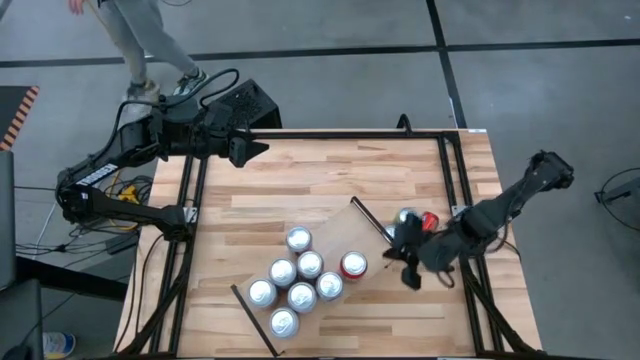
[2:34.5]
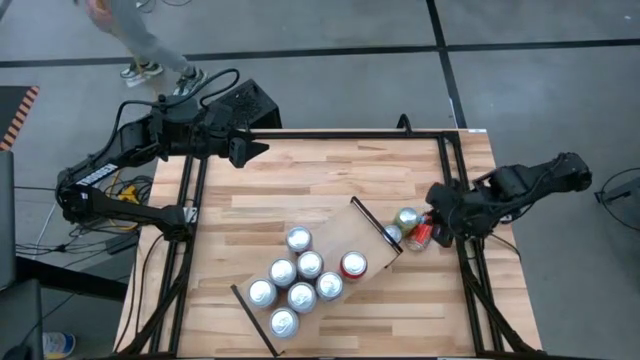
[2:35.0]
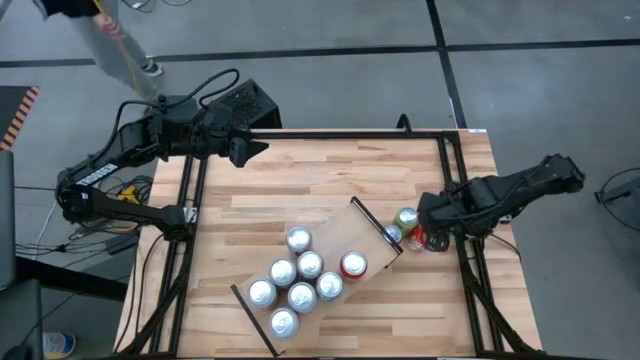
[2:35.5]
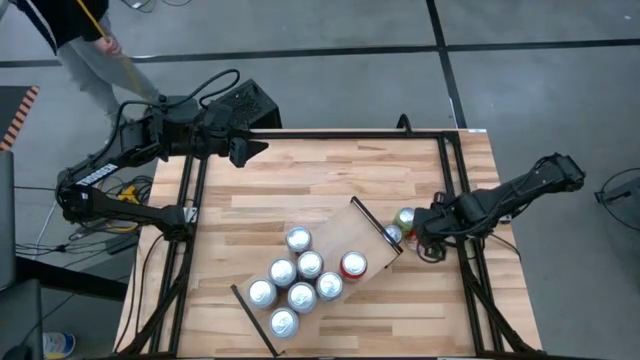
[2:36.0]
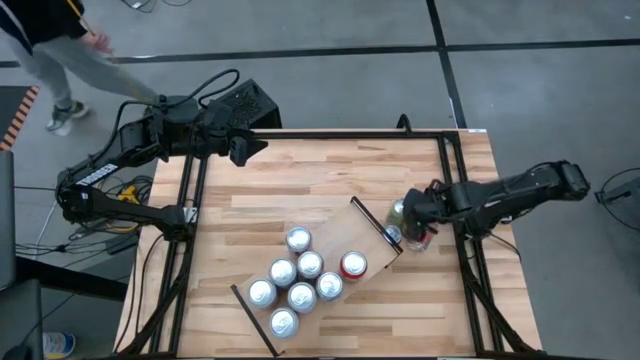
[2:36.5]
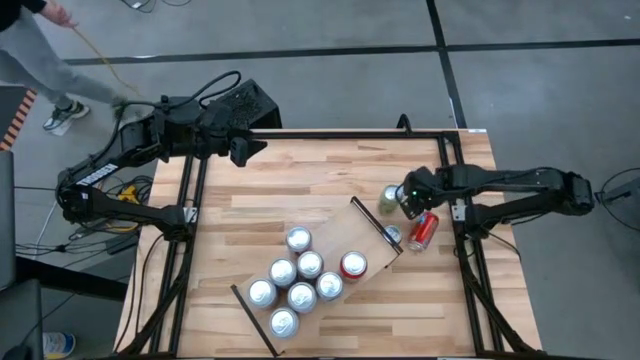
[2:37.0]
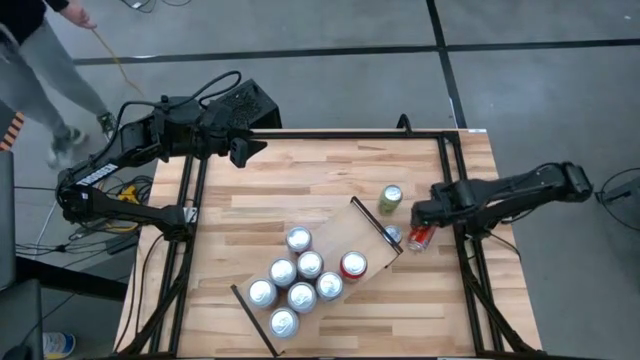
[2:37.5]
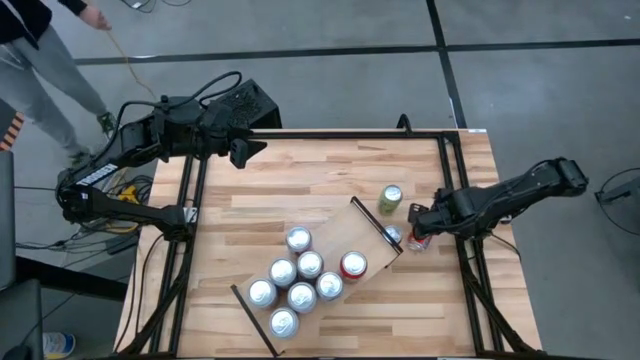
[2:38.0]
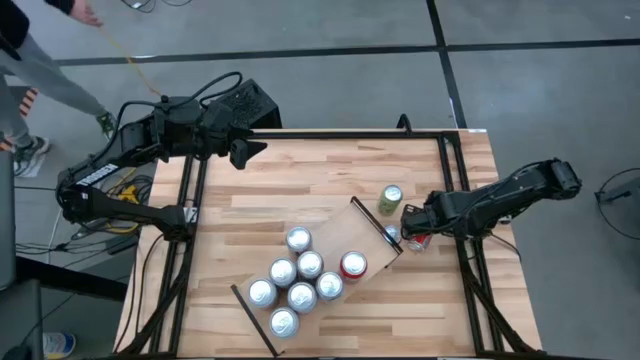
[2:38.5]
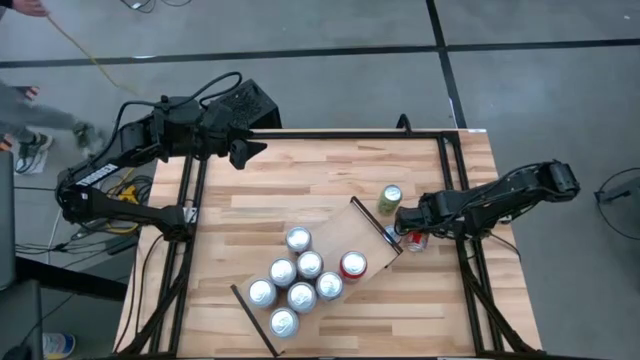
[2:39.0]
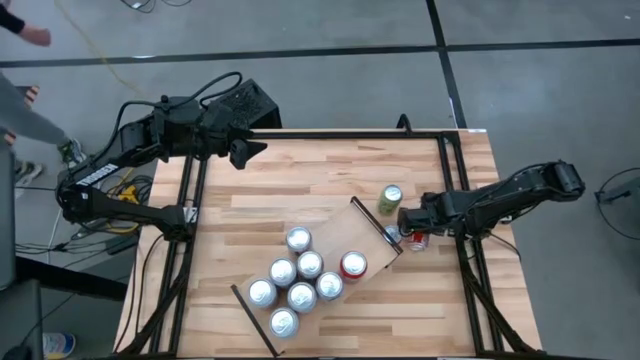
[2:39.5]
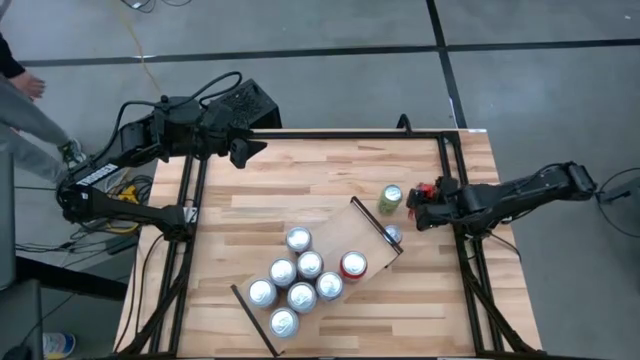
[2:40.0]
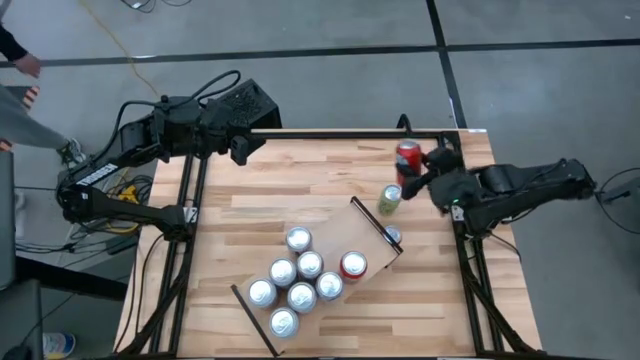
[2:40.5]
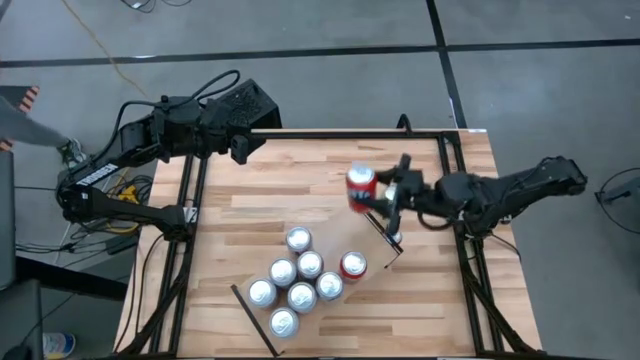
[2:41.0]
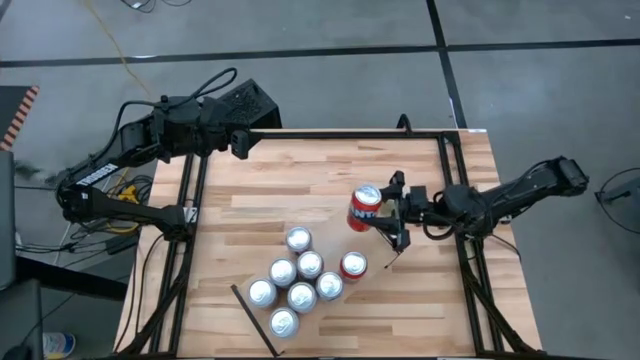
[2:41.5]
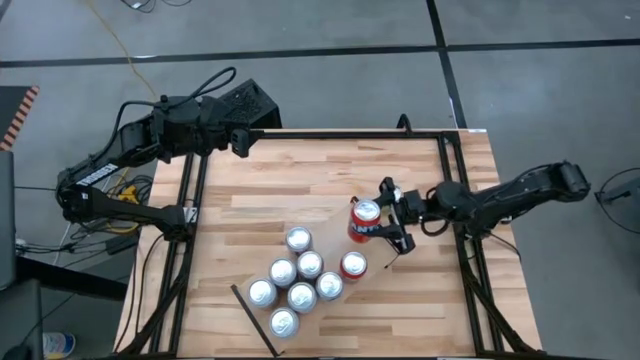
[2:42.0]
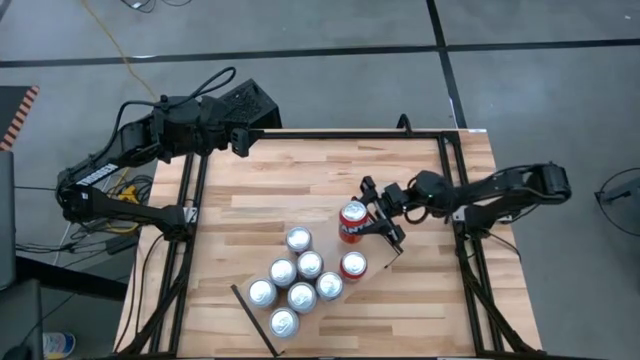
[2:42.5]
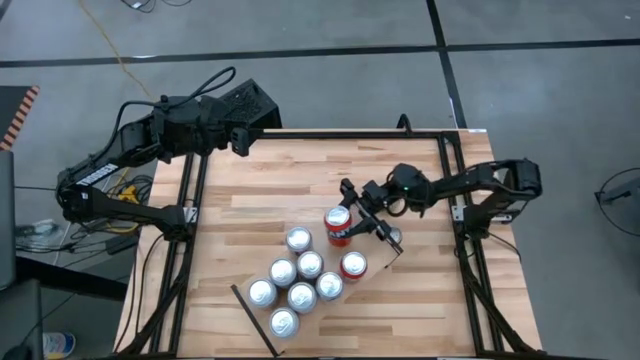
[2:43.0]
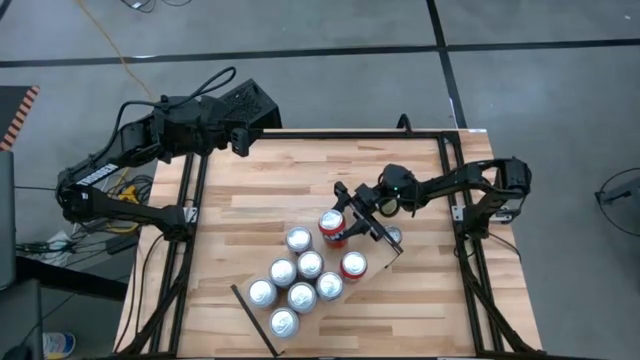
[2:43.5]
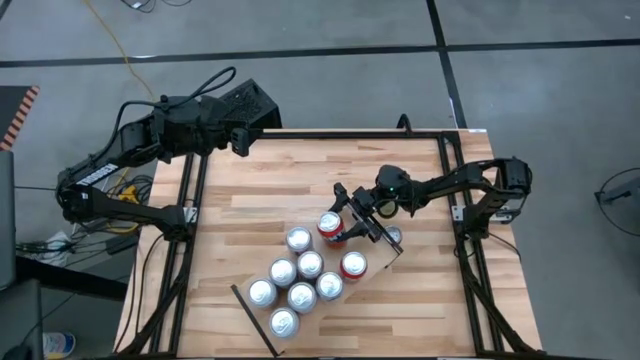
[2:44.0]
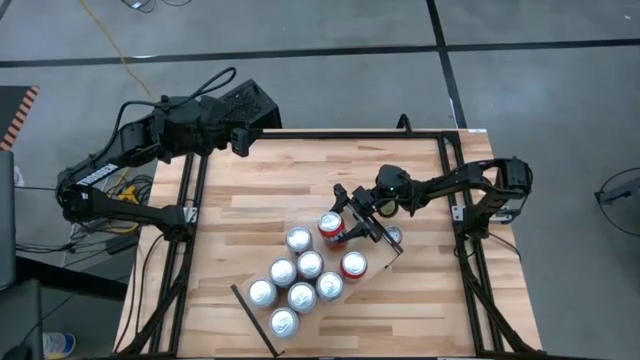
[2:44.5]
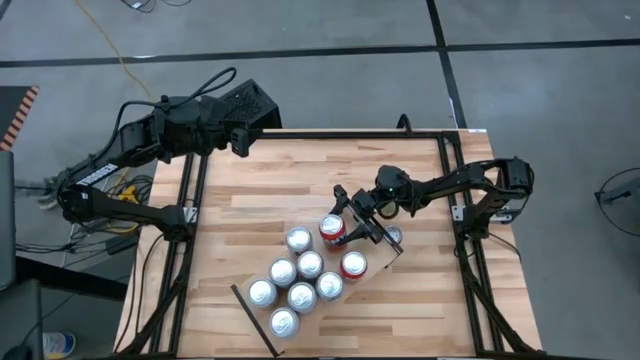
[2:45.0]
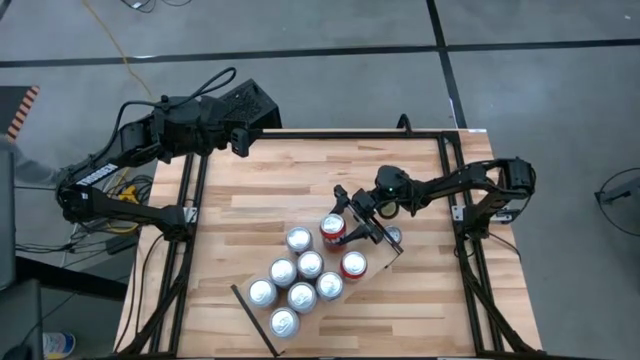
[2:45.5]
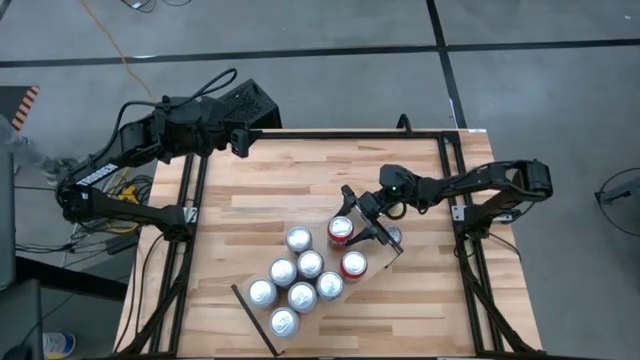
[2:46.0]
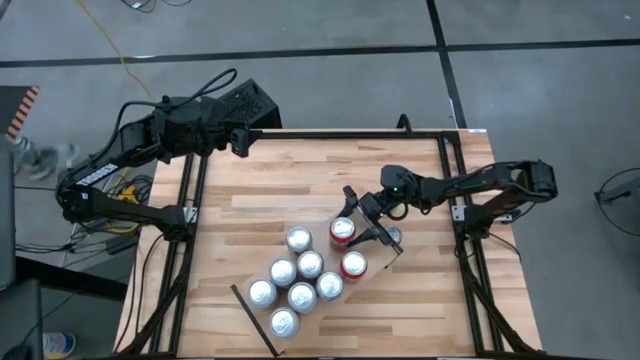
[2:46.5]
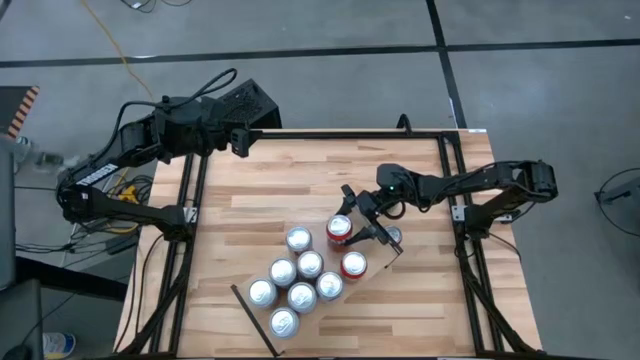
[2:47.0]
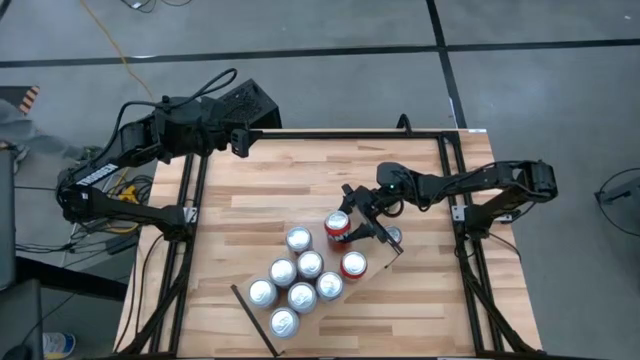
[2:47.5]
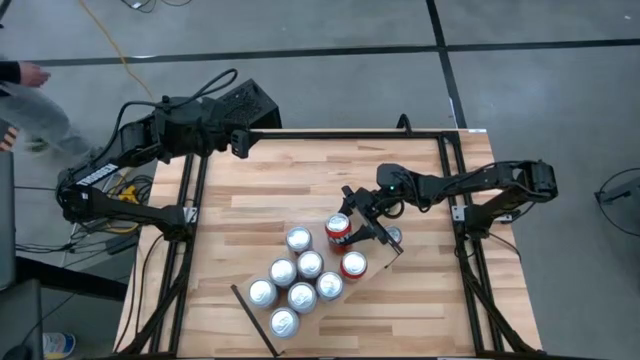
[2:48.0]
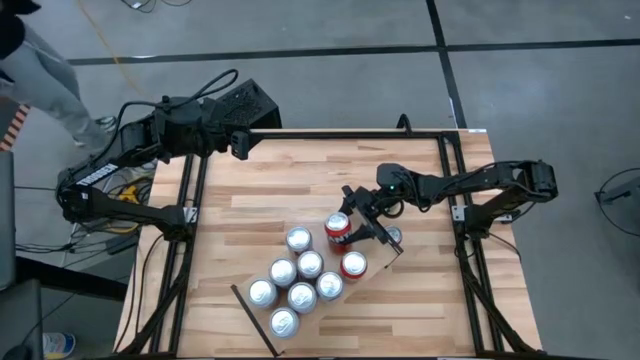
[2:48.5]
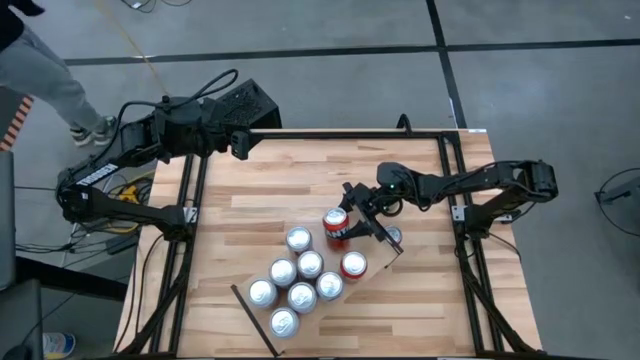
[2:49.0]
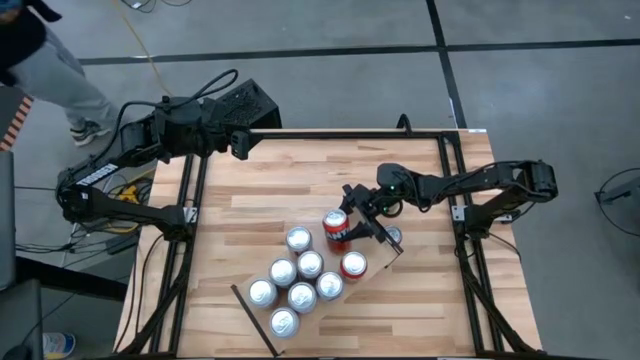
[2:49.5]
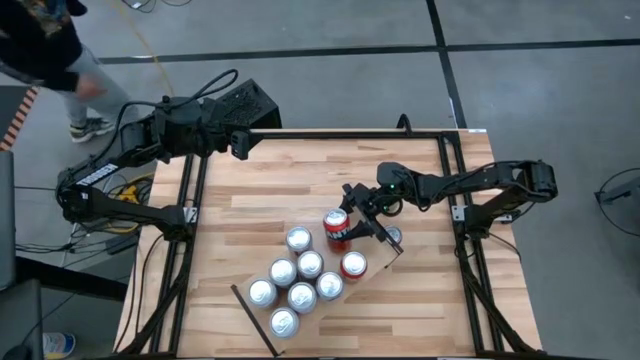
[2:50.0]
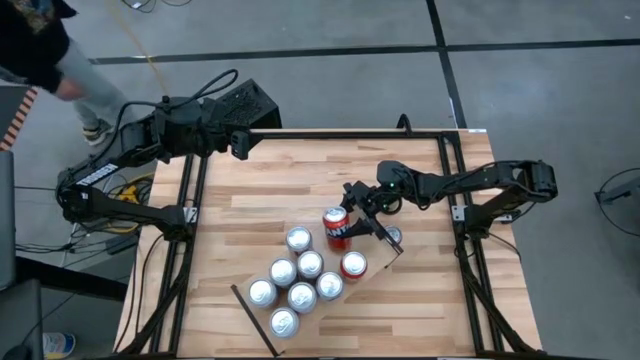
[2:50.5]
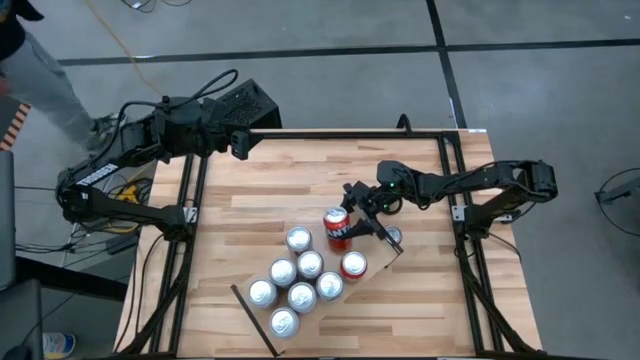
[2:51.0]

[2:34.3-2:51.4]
Task: Place canned beverage on shelf
Put the red soda can on the shelf aligned with the other red soda can

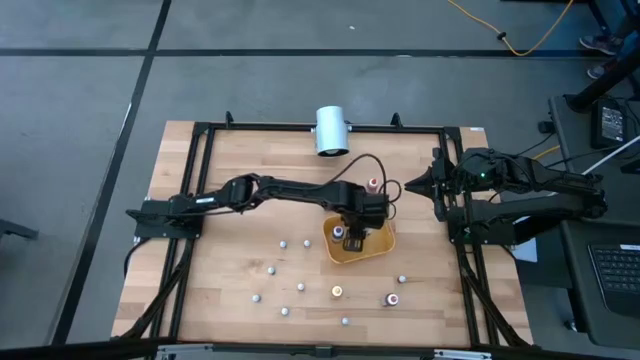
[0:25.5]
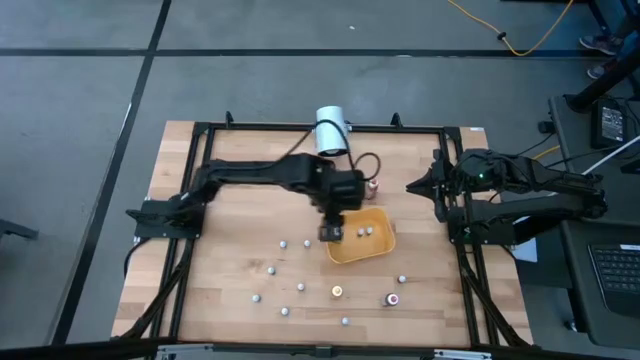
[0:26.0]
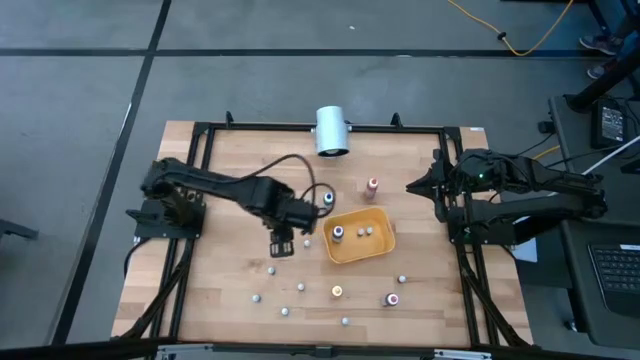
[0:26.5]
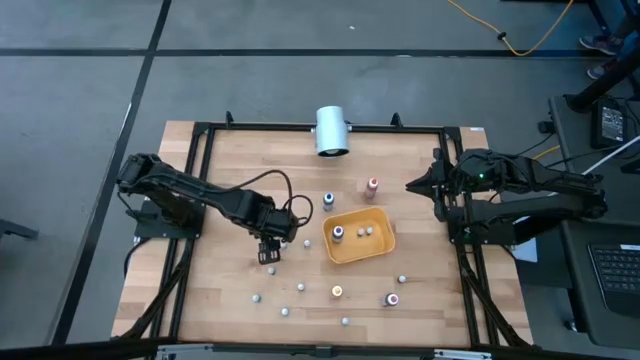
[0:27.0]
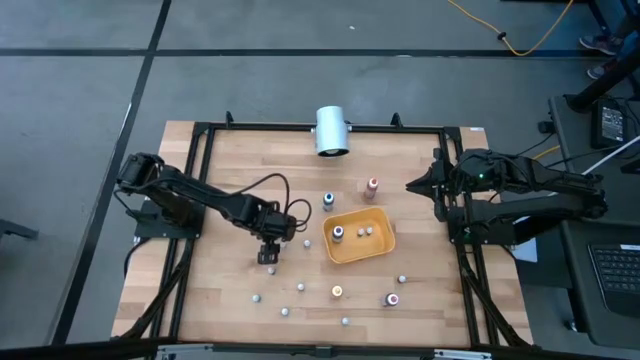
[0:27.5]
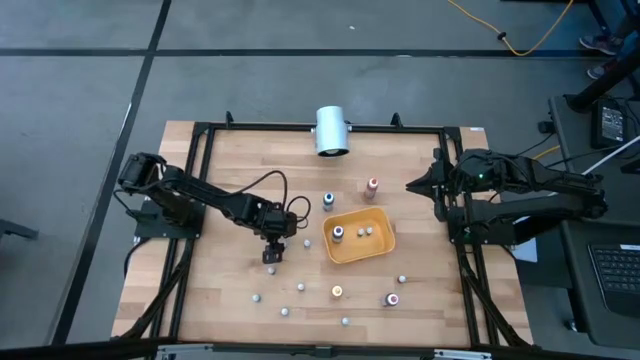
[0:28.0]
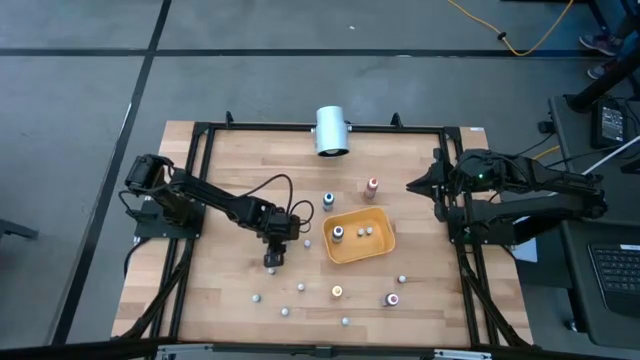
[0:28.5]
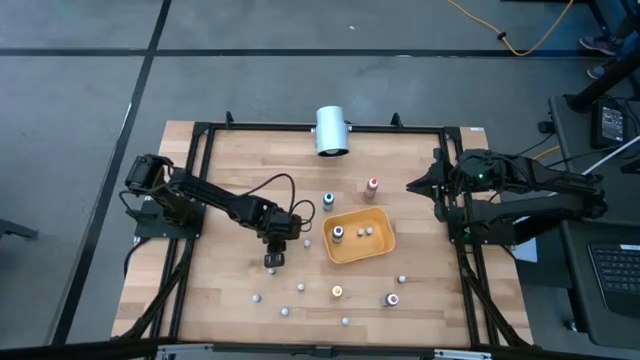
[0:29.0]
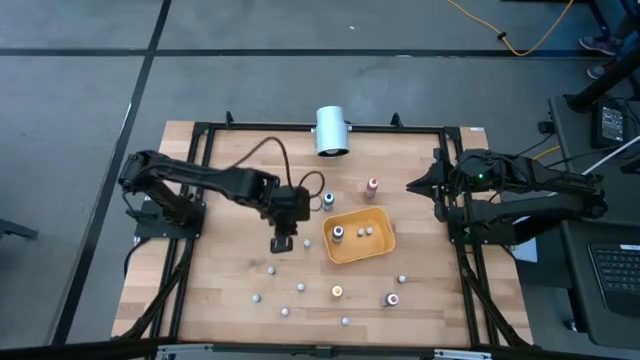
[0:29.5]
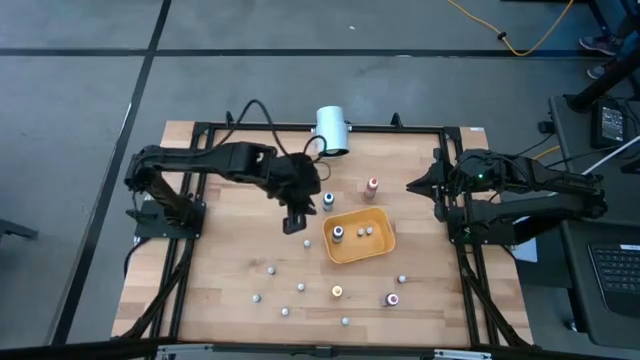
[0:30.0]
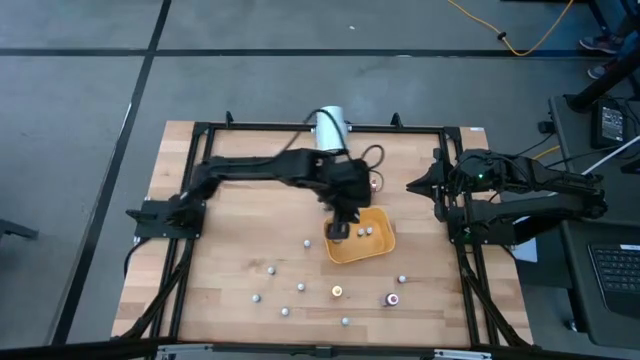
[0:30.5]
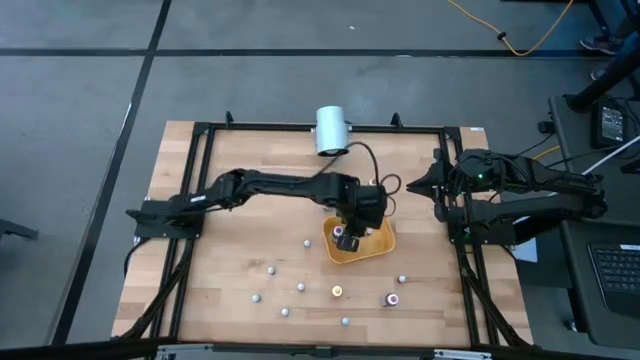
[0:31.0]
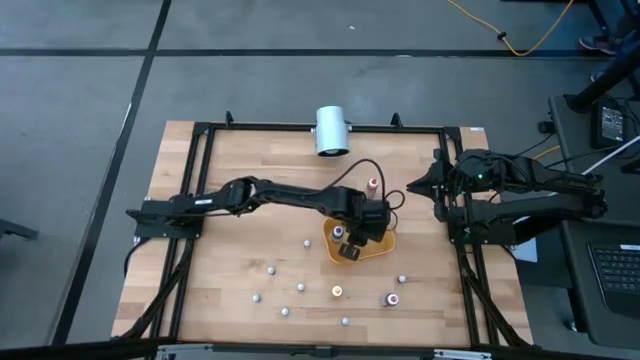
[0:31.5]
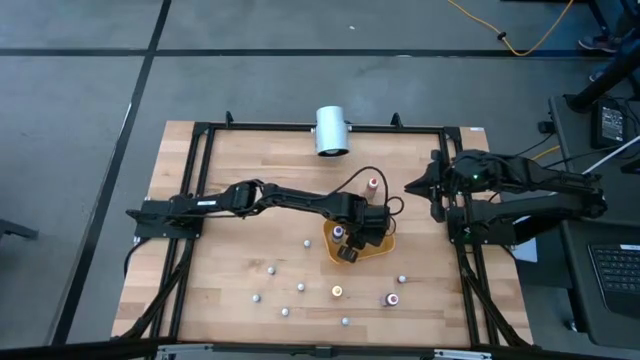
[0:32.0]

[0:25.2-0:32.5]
Task: Pick & Place food coloring
Put the small green food coloring bottle into the yellow bin
